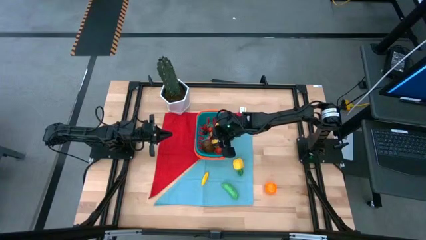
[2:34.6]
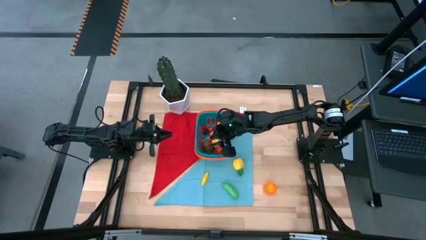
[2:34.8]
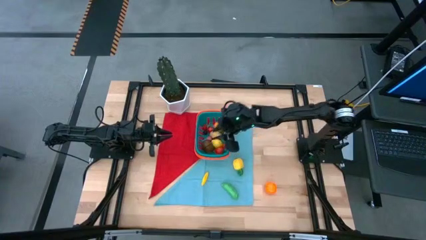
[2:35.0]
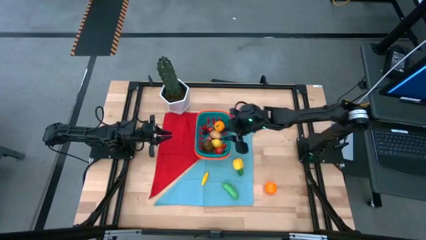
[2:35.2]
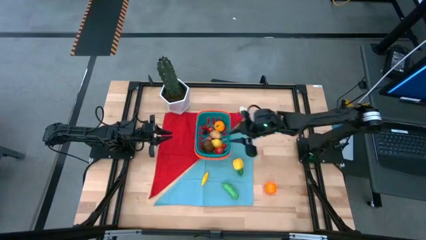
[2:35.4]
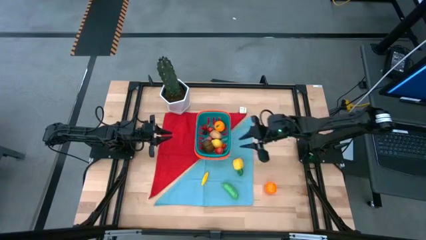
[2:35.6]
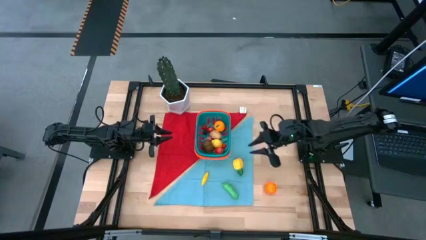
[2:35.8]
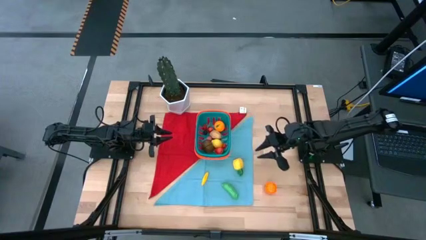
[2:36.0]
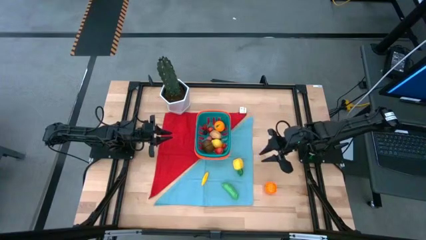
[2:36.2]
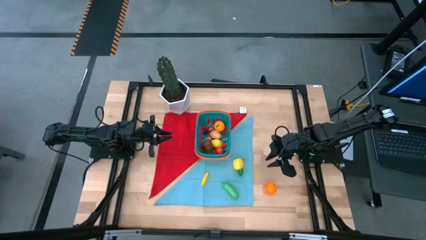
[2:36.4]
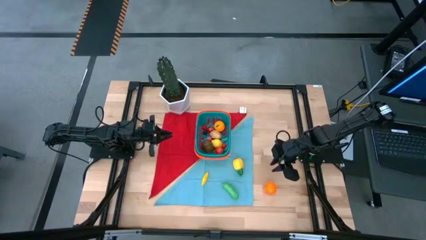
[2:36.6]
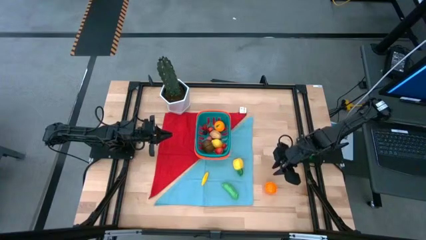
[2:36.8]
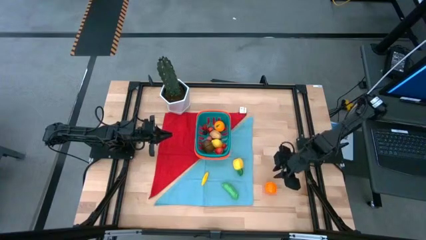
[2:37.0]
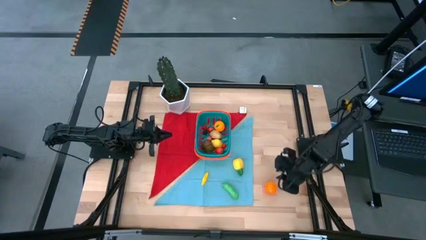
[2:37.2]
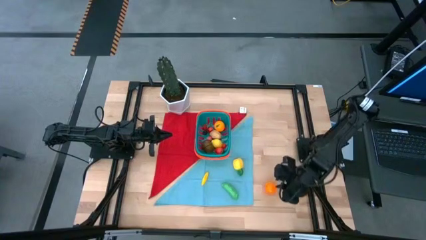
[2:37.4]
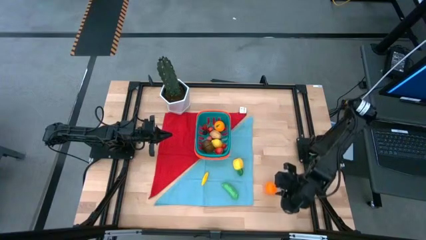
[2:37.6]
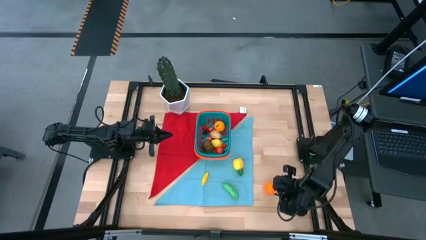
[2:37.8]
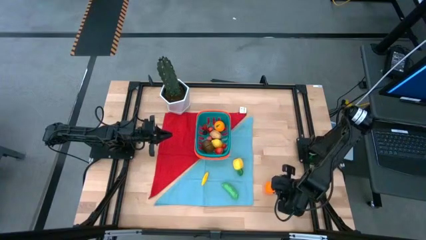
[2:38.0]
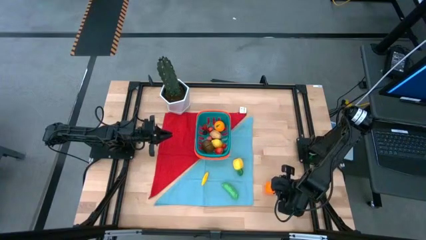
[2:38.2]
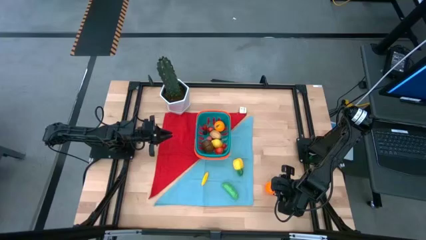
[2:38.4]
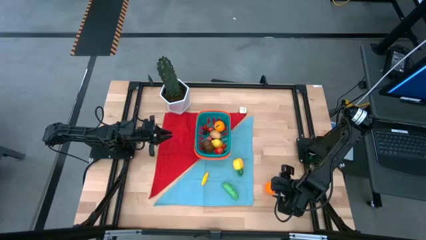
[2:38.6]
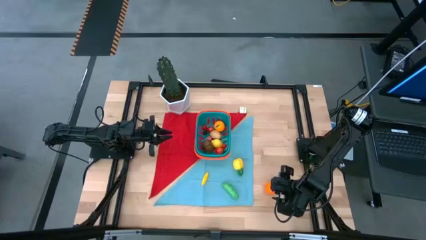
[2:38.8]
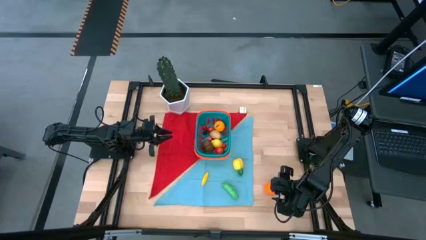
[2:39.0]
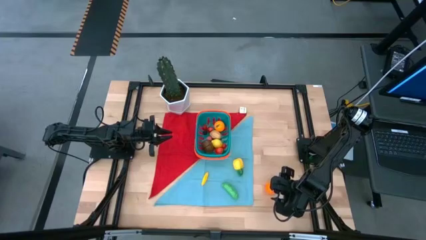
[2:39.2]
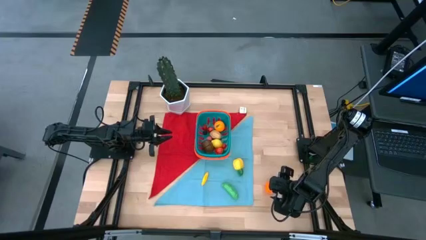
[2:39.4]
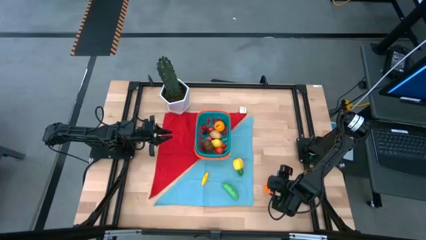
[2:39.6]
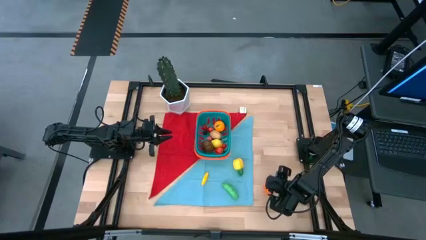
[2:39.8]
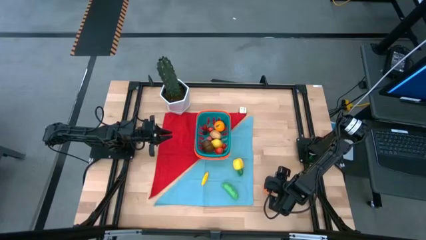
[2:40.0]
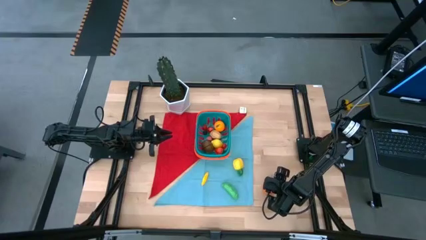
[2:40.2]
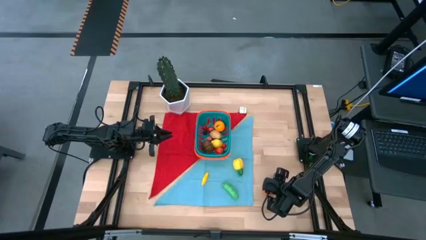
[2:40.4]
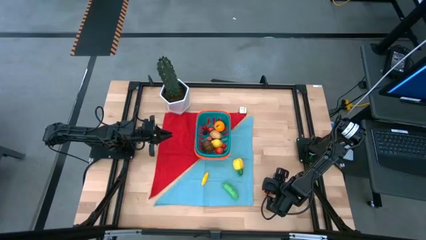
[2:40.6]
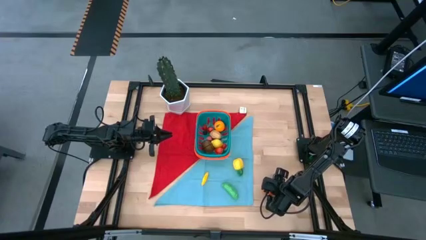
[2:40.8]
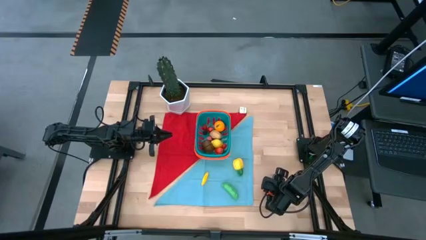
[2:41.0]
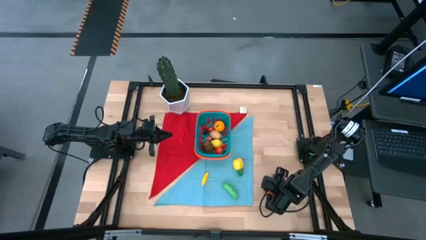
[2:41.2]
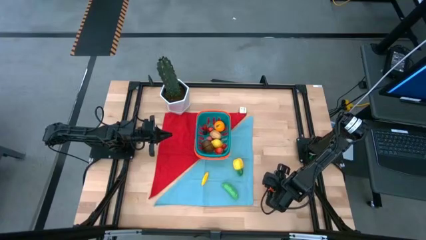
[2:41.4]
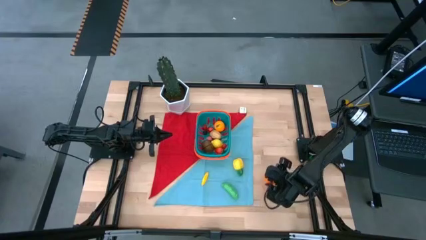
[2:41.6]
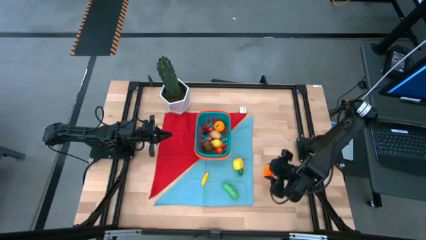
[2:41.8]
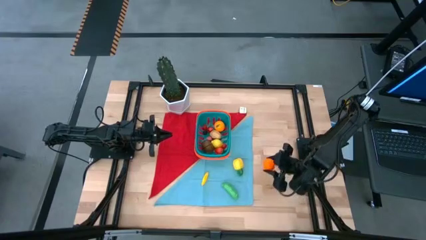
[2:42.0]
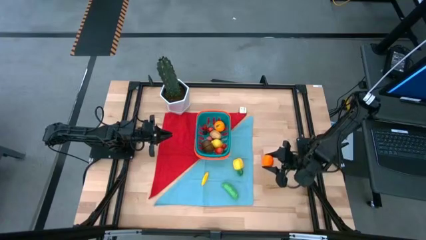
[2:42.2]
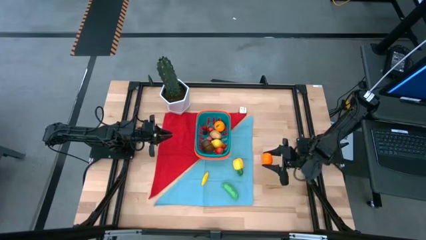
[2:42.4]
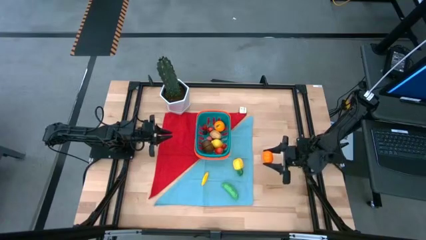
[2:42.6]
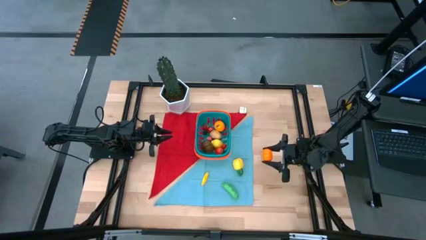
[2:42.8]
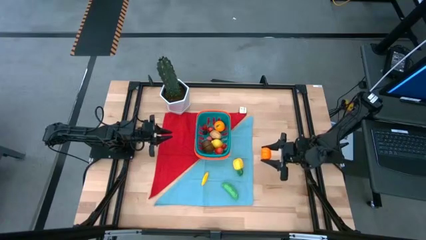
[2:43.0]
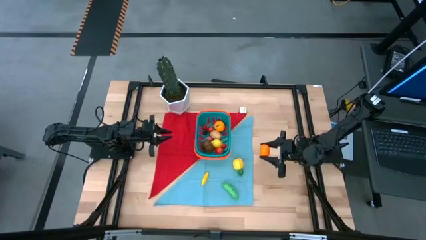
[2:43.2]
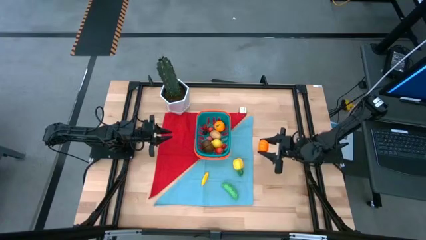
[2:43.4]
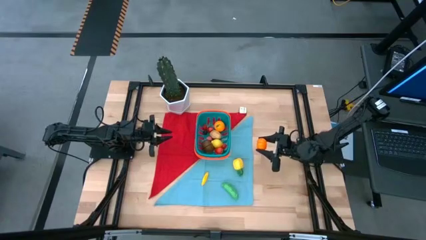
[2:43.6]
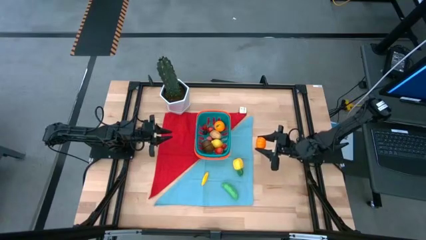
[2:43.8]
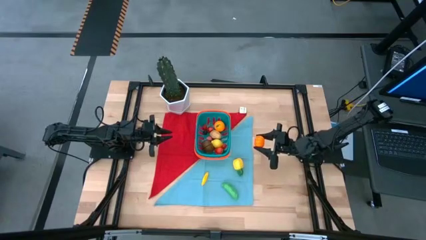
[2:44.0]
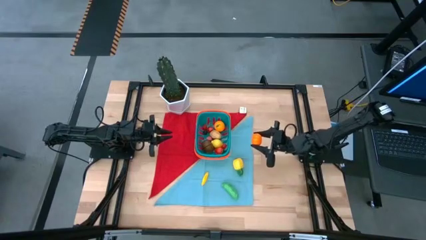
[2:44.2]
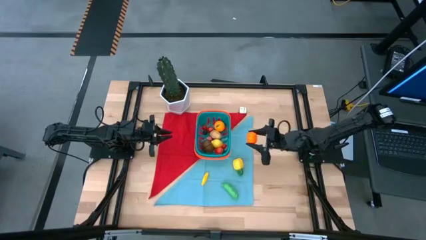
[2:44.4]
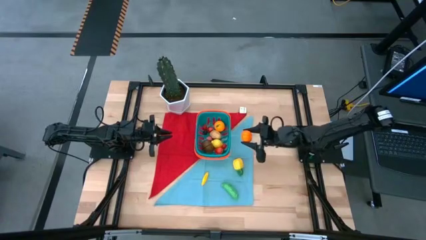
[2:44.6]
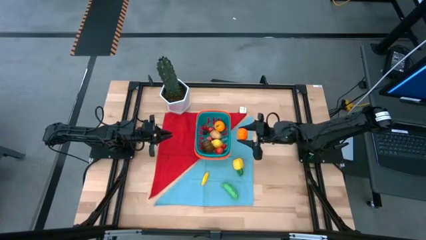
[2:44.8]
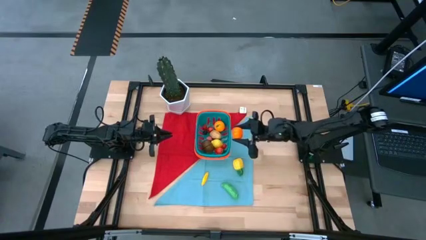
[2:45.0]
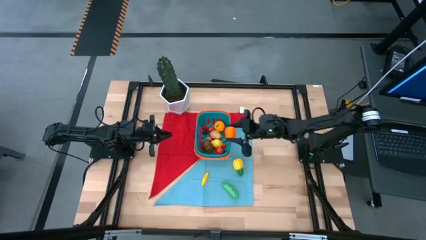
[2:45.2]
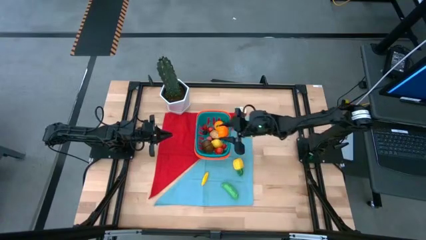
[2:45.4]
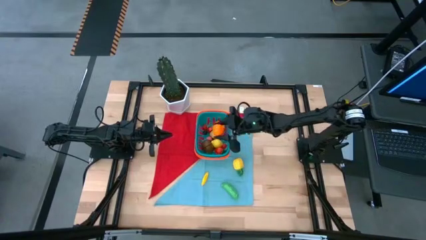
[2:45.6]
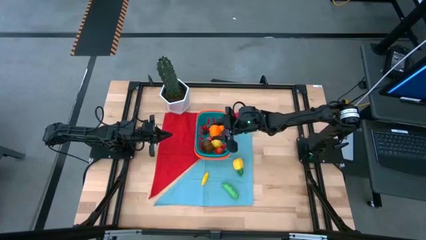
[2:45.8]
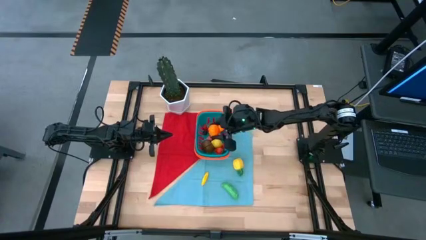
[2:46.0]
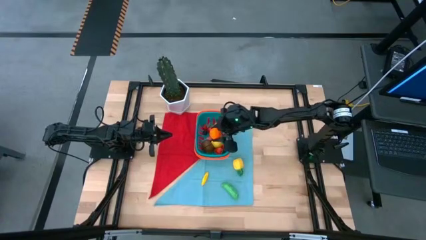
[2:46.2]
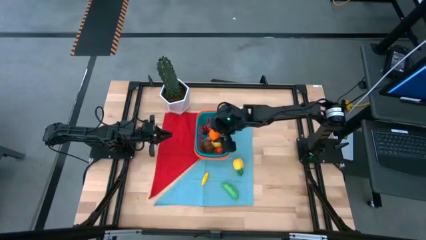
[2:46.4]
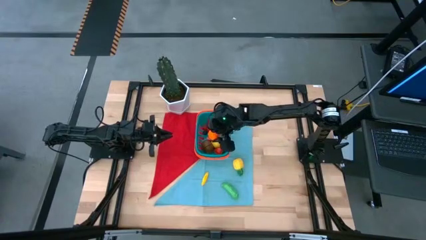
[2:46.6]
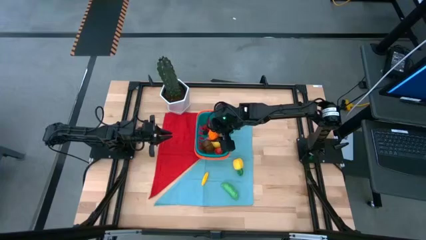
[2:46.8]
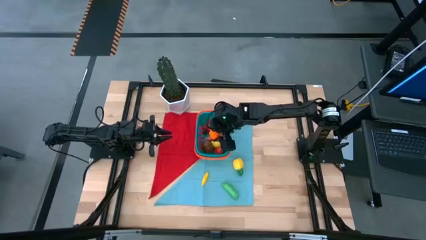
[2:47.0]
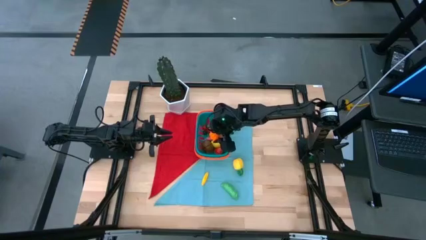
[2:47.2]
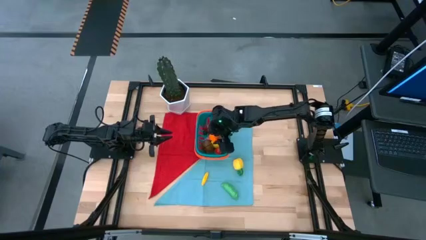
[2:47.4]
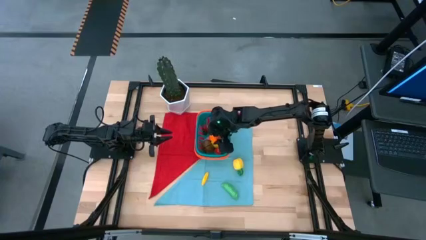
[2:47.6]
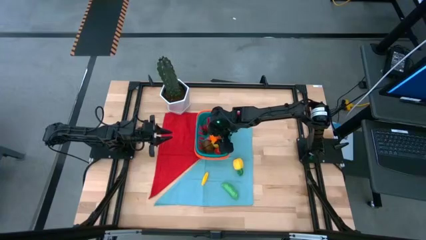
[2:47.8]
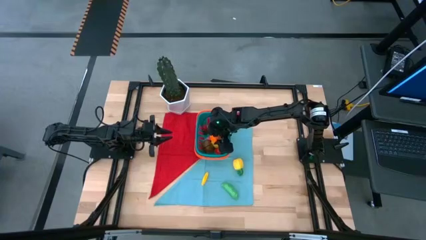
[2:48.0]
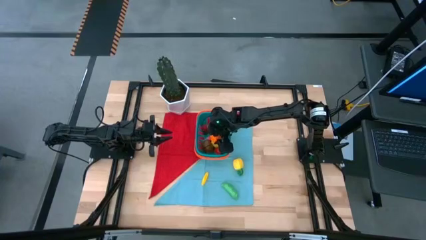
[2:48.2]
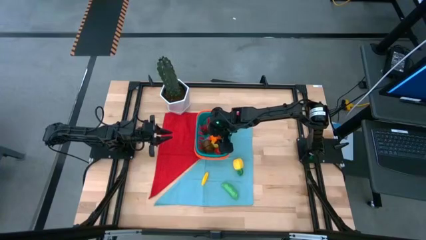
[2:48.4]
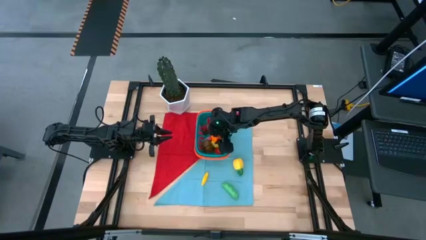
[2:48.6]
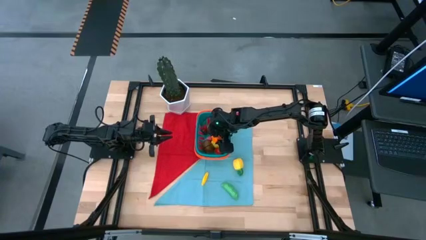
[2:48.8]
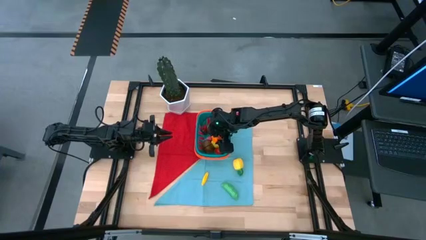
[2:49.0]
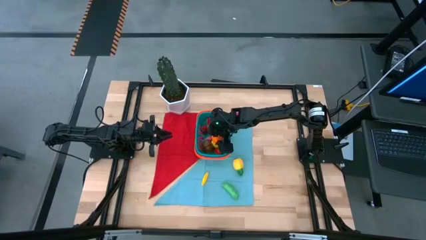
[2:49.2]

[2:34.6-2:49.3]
Task: Pick and placing Produce into tupperware
Put the tangerine into the basket

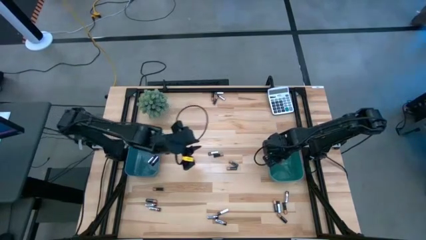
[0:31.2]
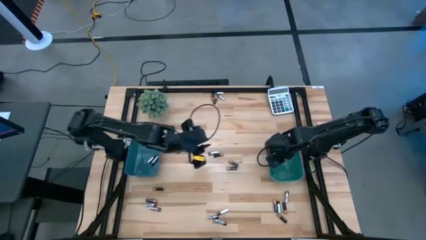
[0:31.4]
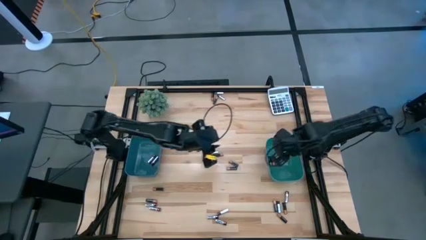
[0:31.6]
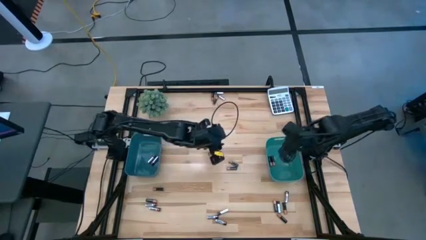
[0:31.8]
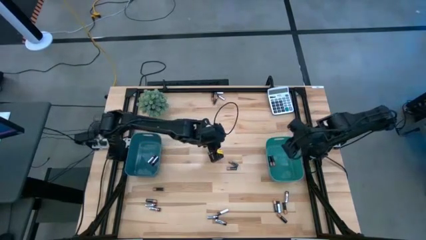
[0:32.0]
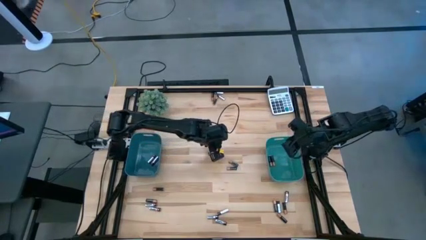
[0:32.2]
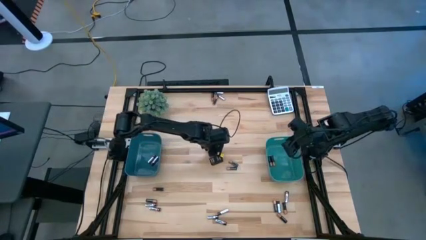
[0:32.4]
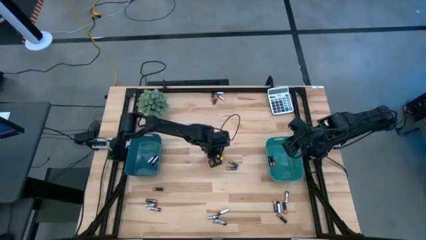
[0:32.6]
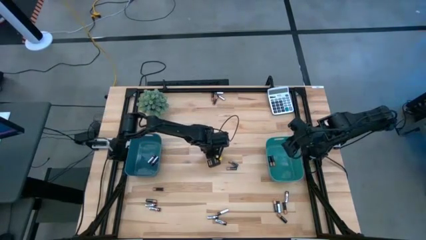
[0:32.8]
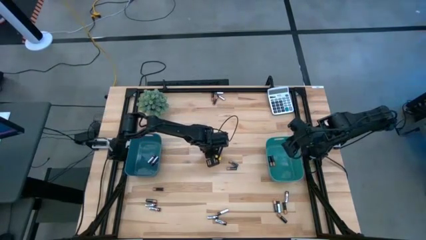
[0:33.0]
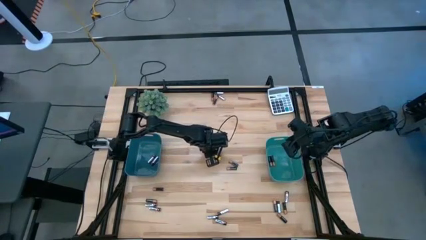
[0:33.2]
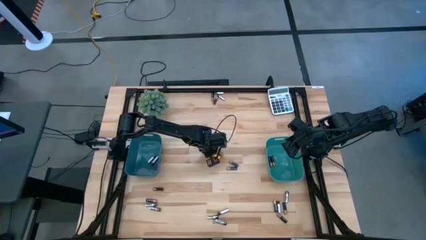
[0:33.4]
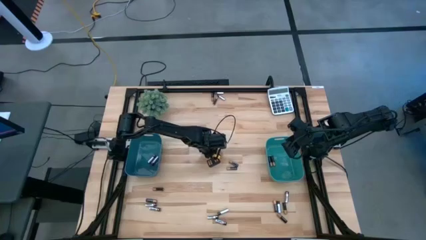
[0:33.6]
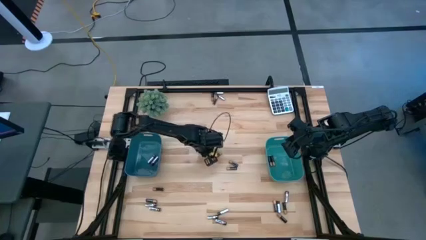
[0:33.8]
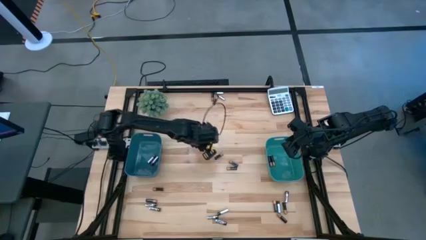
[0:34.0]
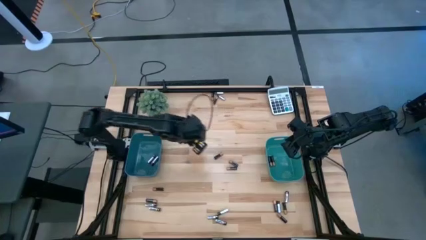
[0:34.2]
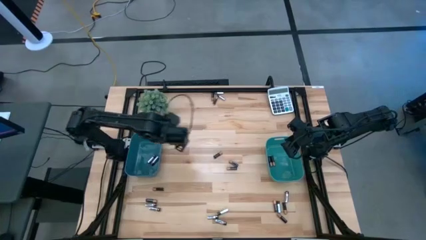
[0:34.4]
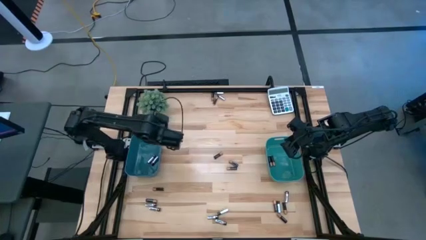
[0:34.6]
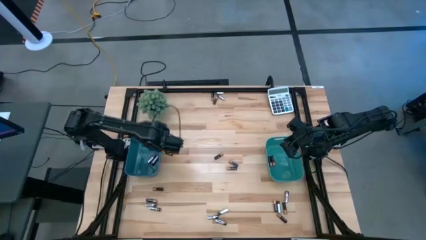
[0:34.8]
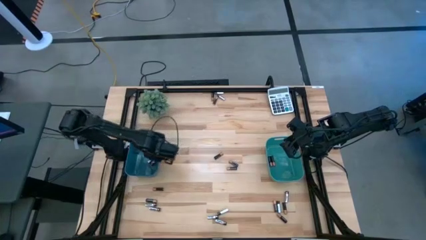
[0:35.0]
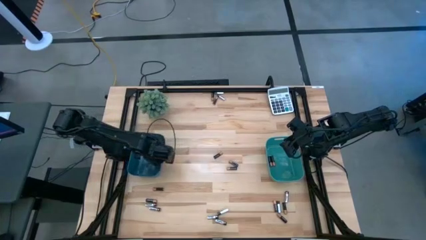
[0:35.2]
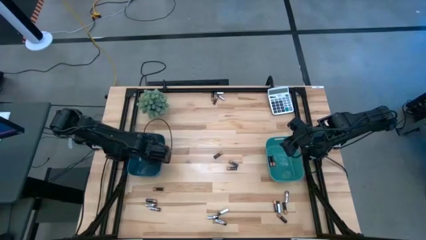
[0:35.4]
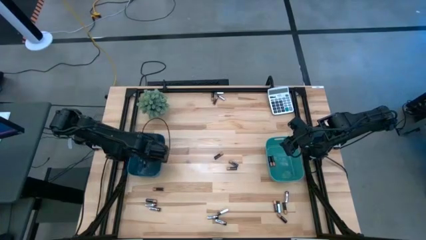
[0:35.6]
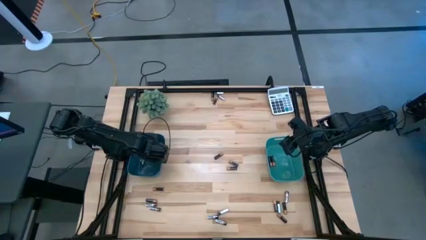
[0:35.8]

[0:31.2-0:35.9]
Task: Sort batteries
Put the silver battery into the blue bin
